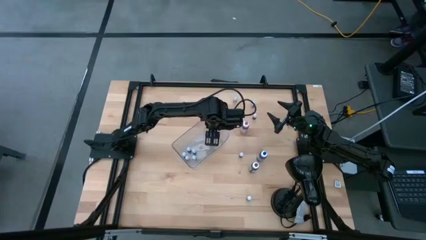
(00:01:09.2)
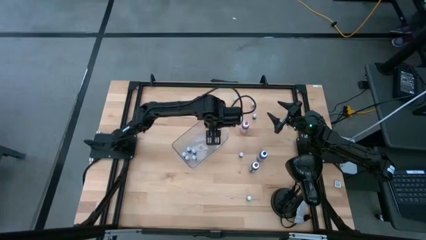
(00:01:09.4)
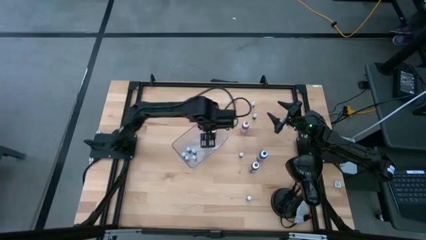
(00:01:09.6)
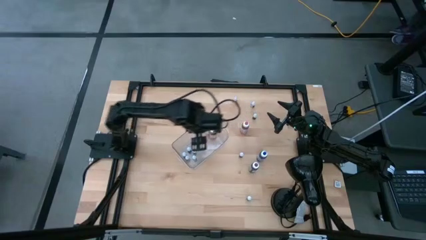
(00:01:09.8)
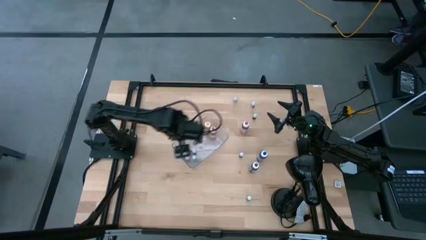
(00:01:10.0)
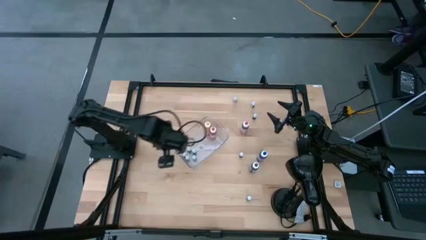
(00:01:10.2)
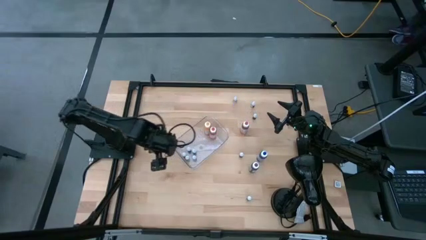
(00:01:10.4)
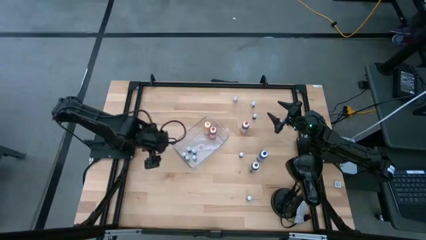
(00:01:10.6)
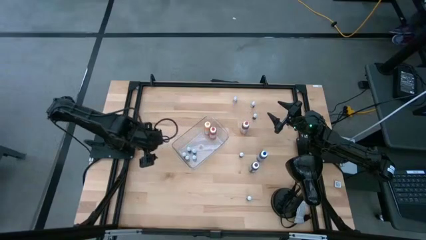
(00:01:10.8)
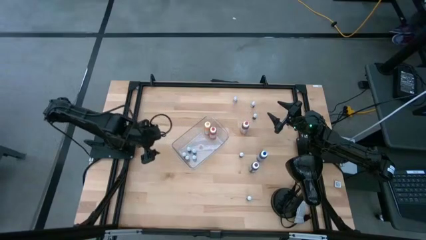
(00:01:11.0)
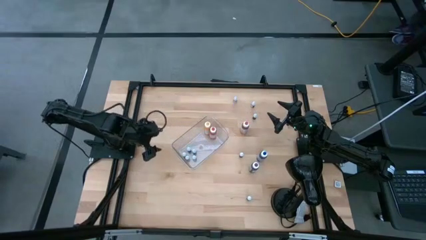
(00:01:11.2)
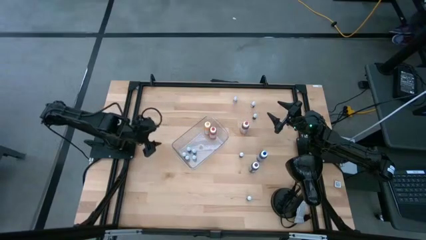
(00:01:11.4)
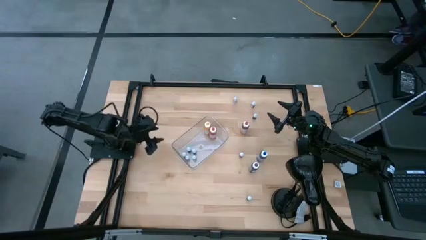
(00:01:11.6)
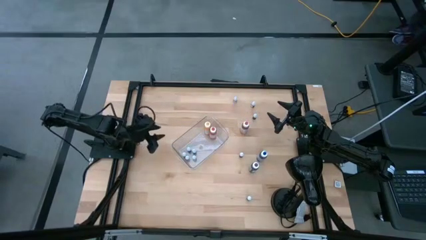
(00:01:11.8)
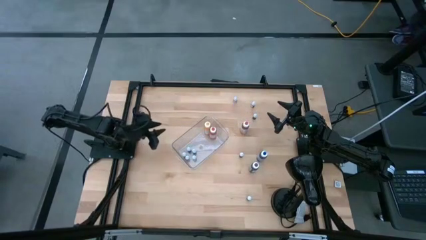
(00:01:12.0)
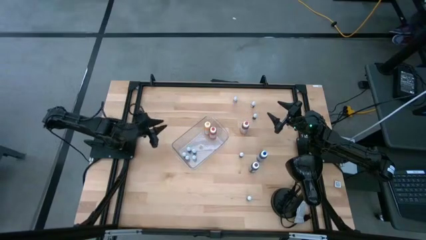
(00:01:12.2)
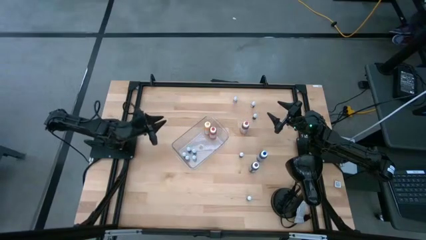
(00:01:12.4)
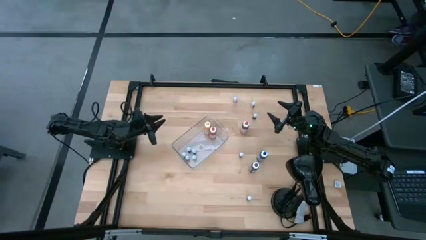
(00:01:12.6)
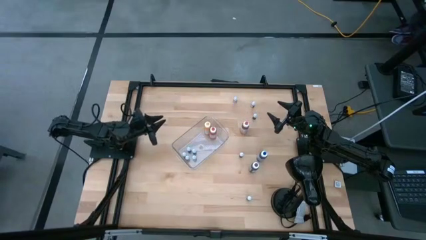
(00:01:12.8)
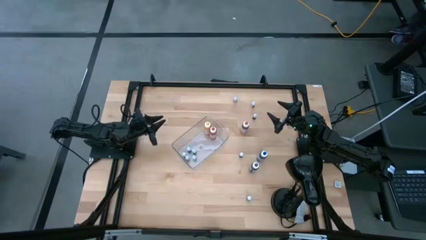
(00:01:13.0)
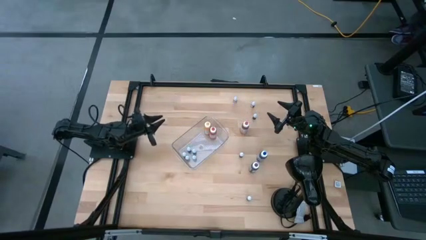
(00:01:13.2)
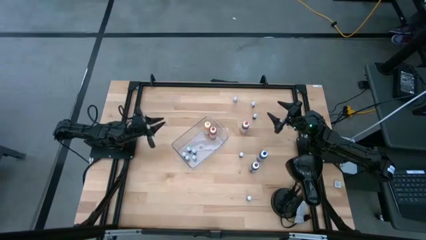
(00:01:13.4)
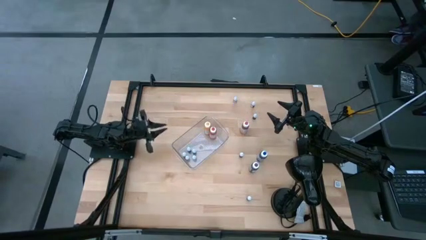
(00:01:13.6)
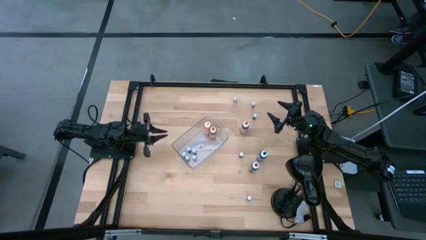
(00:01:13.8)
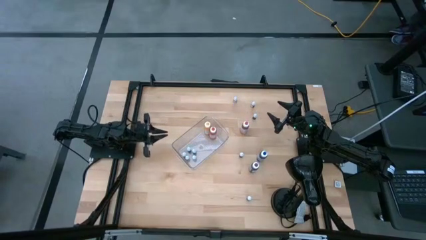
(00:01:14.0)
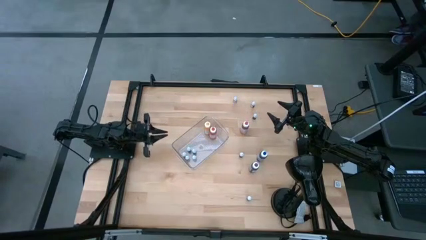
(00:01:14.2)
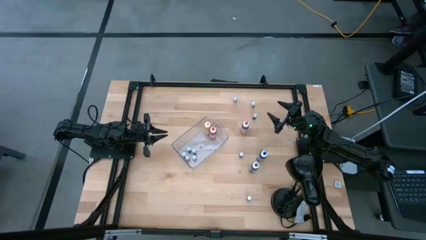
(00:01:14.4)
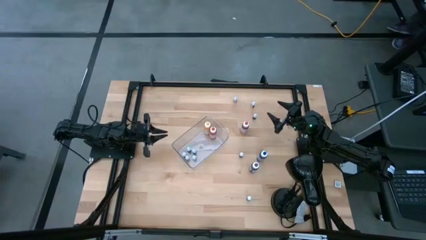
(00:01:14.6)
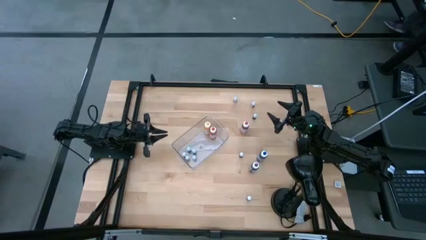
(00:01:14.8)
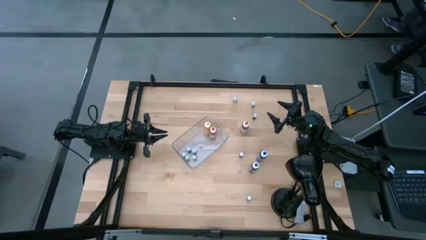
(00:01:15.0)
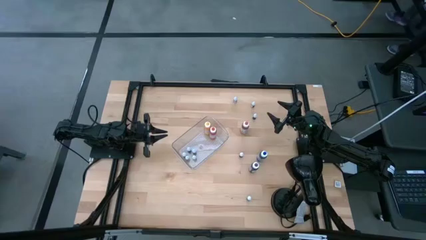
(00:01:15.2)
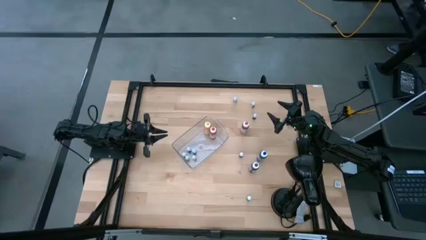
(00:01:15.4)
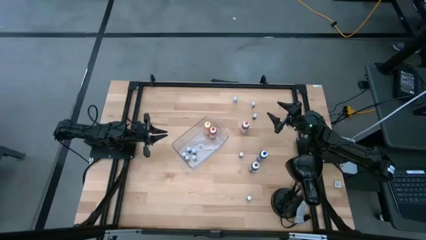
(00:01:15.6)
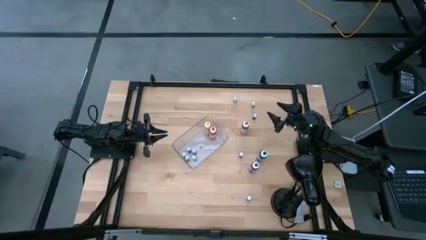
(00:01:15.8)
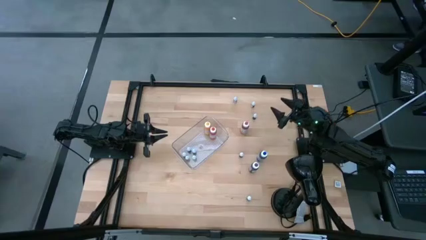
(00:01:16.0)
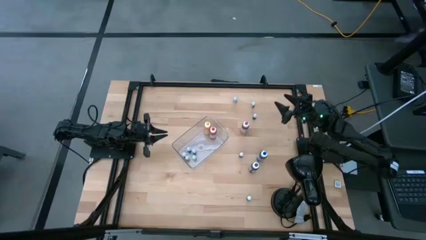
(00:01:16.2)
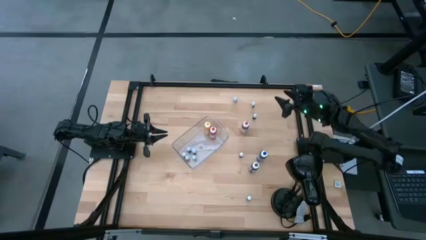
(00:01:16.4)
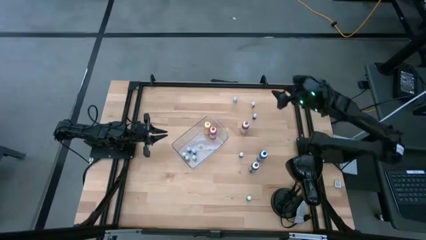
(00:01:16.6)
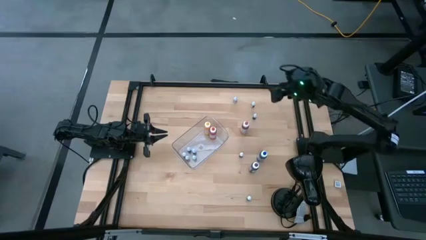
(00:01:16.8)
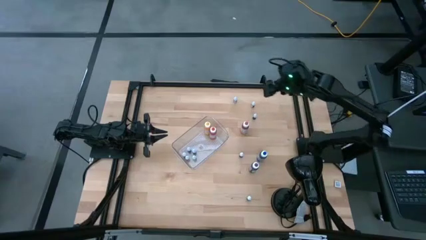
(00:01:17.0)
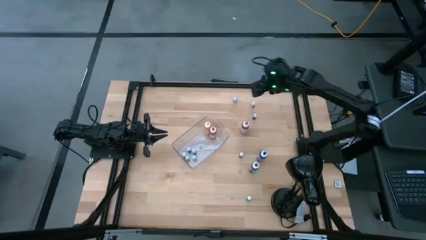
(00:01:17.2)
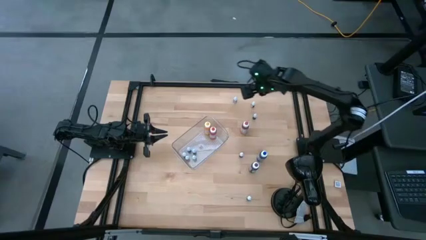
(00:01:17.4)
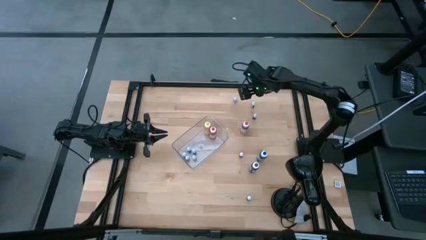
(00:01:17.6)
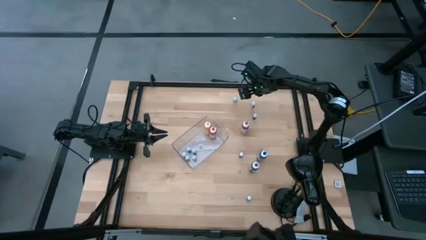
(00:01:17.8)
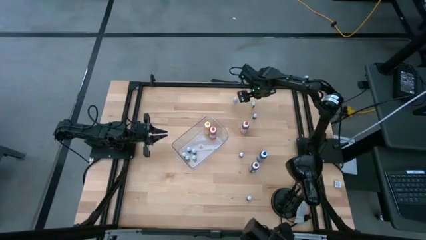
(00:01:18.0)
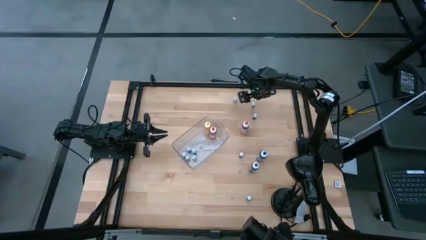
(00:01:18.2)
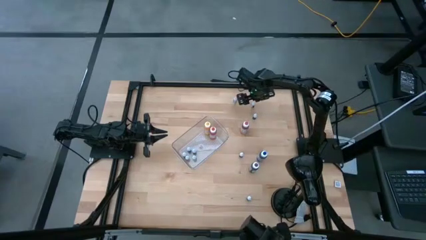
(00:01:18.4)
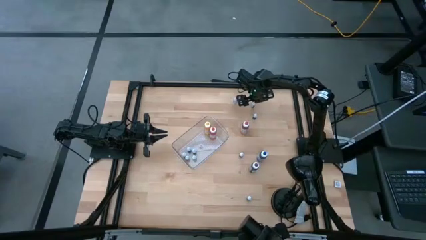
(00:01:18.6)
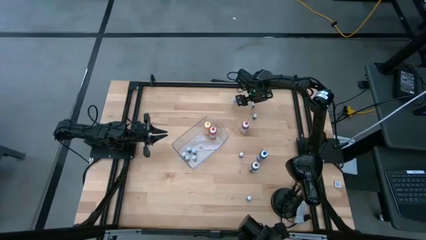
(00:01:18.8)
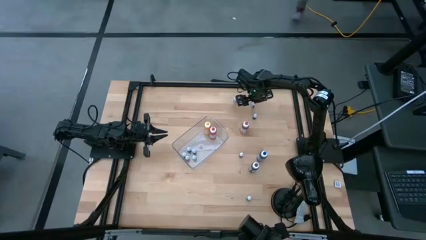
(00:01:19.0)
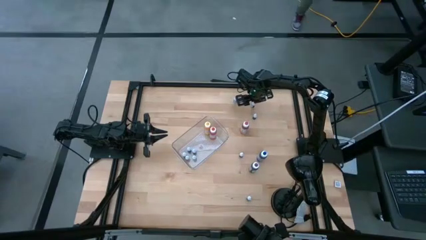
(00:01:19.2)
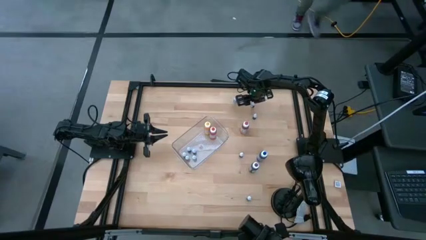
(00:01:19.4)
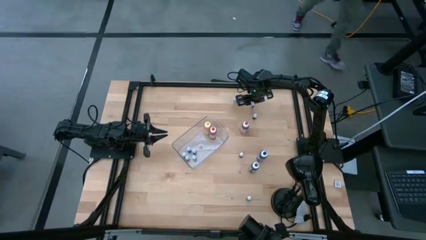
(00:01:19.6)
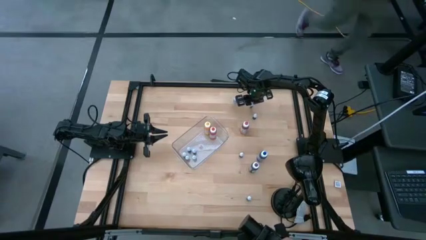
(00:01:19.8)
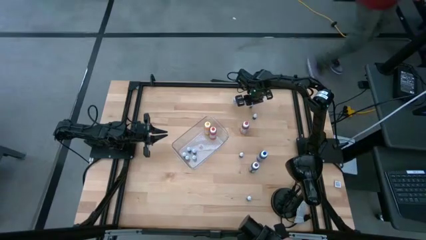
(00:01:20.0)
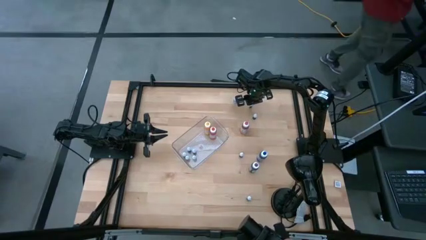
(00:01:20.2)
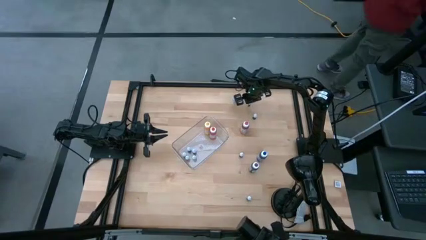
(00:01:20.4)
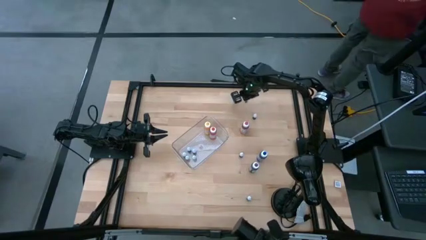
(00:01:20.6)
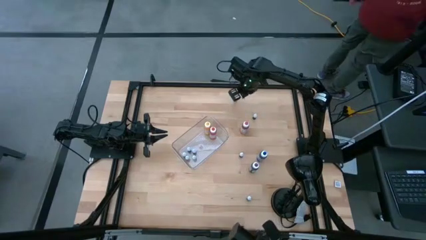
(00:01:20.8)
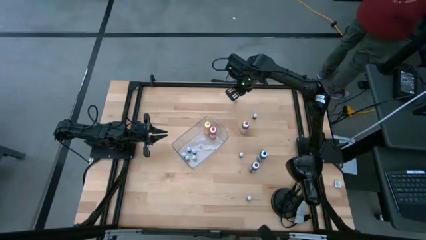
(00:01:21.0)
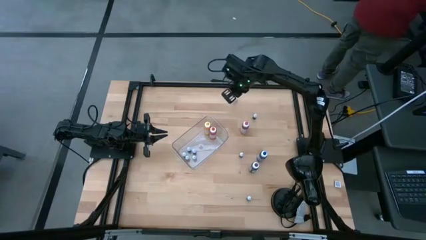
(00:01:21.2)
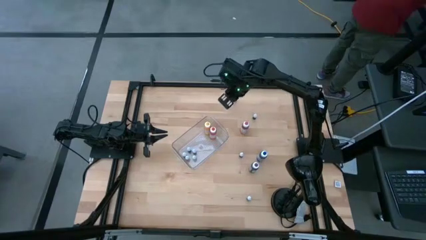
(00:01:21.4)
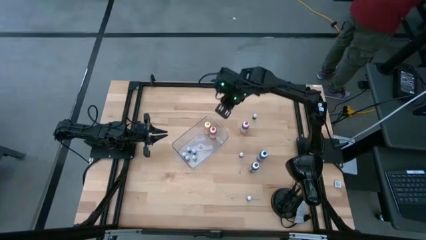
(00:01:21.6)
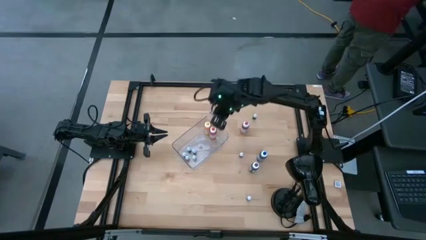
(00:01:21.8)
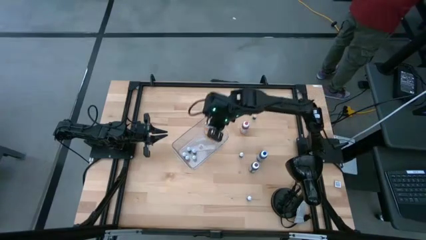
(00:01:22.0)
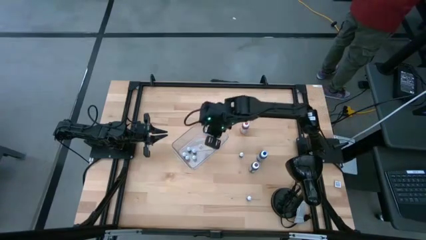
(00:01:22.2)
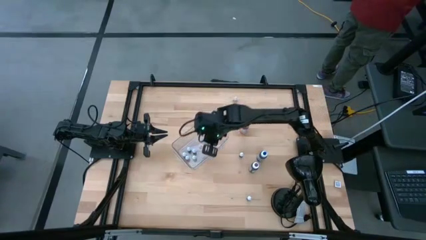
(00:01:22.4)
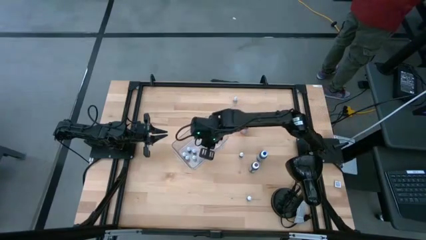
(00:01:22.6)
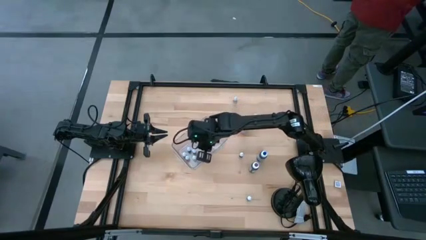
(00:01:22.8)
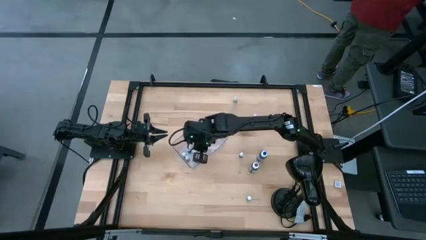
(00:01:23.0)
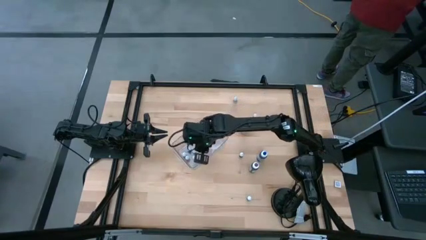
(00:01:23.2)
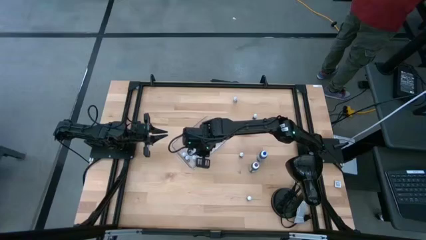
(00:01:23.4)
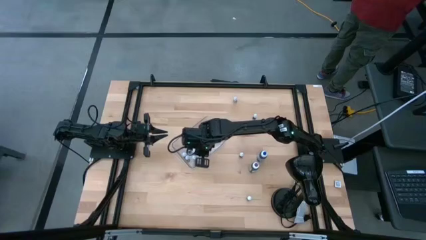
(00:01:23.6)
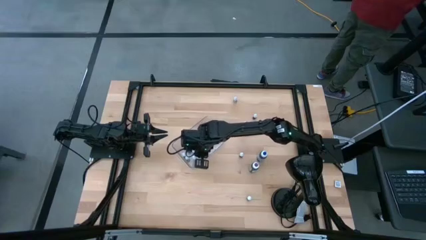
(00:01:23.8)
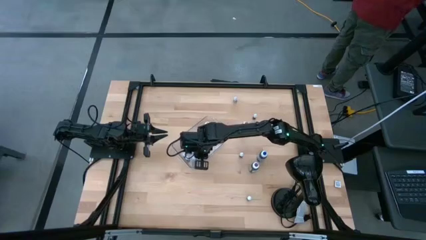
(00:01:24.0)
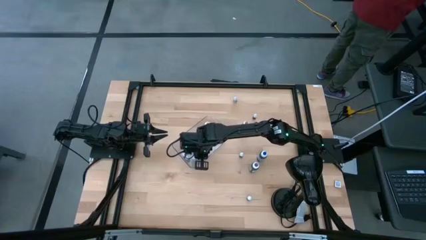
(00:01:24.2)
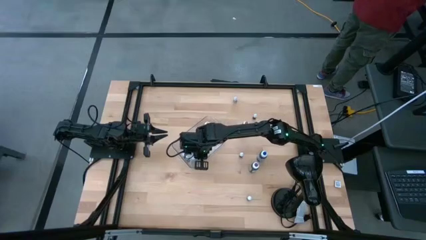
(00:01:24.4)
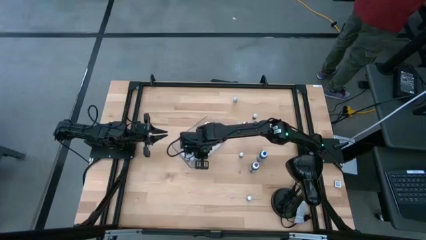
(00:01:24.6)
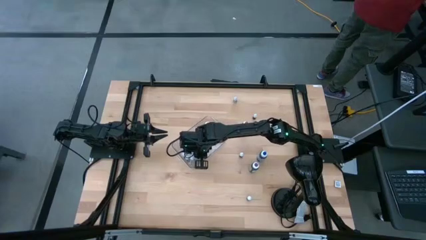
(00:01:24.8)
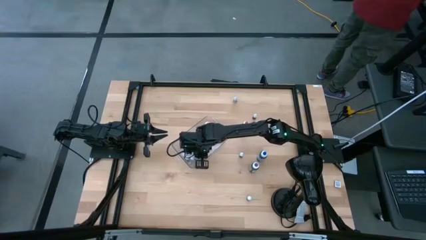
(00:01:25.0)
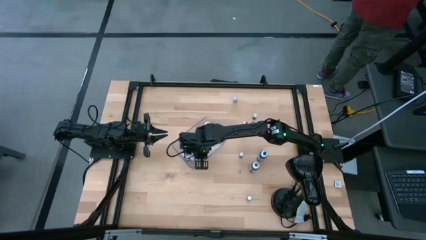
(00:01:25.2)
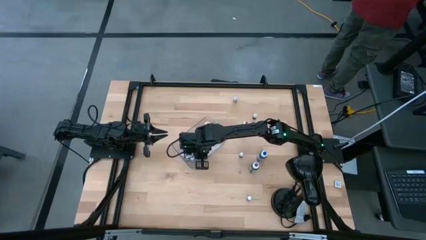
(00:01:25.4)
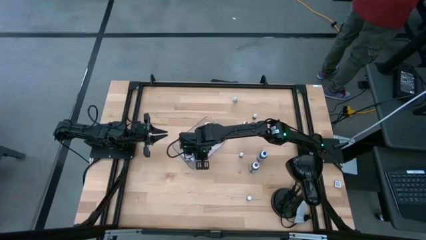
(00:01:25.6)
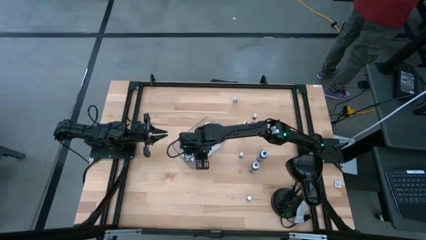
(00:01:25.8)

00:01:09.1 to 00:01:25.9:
Task: Pick & Place food coloring
Put the top small black food coloring bottle into the transparent bin
